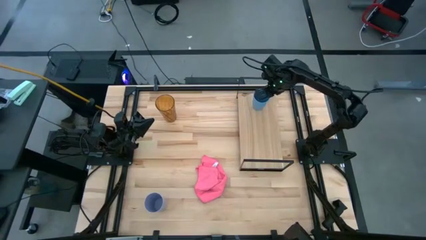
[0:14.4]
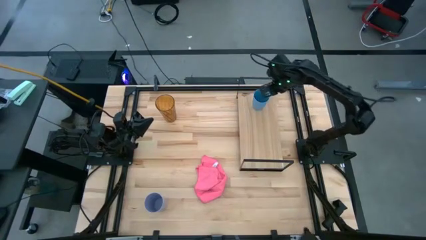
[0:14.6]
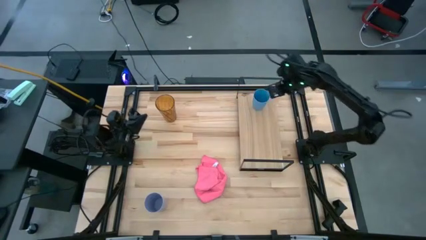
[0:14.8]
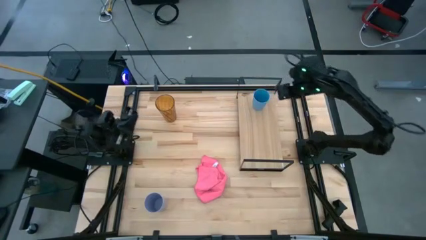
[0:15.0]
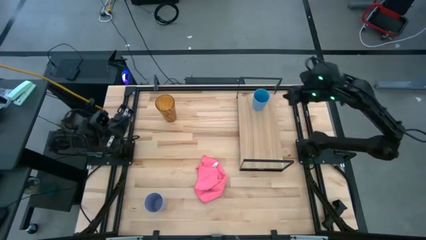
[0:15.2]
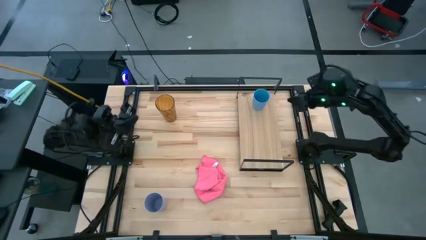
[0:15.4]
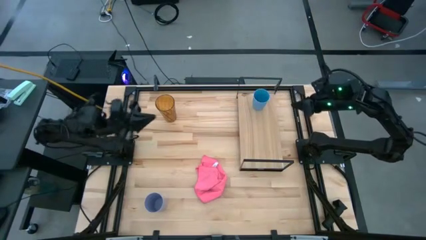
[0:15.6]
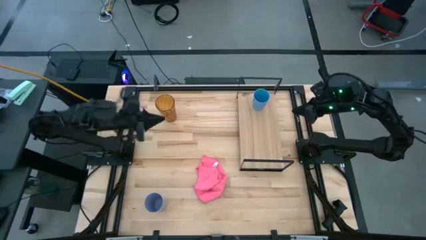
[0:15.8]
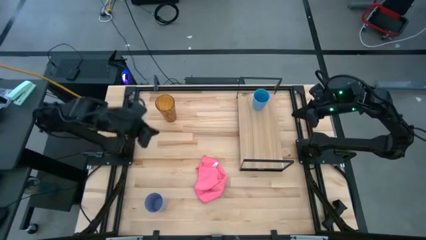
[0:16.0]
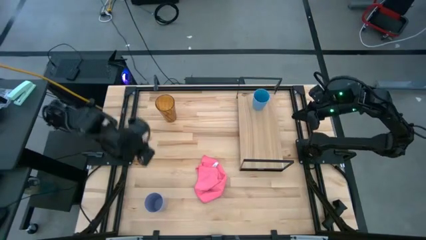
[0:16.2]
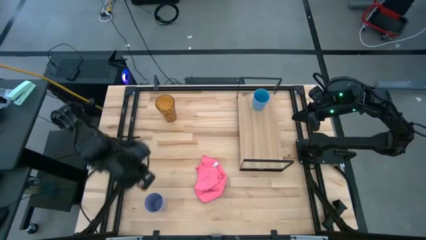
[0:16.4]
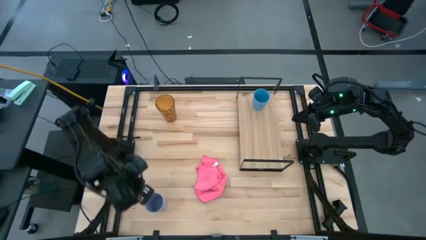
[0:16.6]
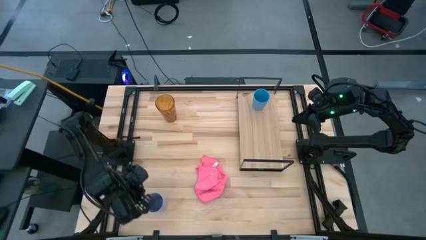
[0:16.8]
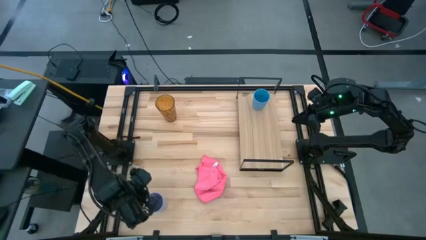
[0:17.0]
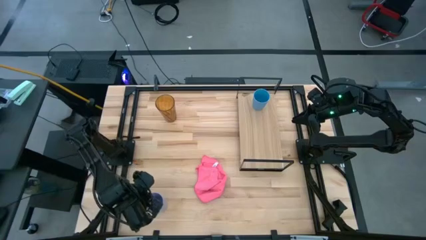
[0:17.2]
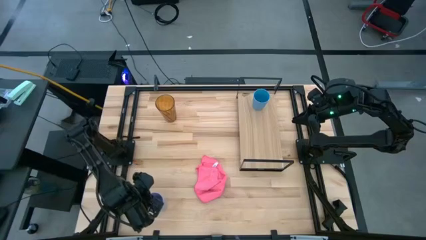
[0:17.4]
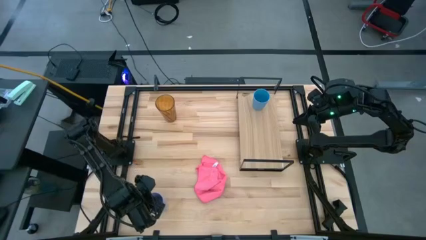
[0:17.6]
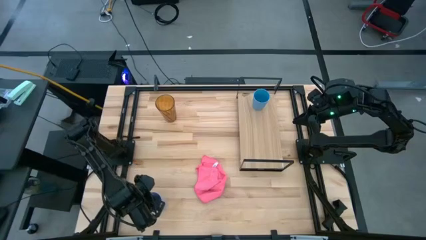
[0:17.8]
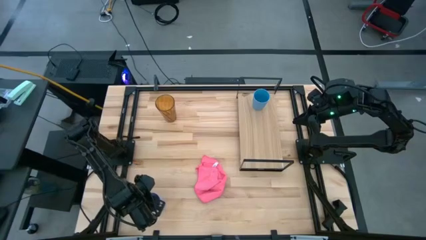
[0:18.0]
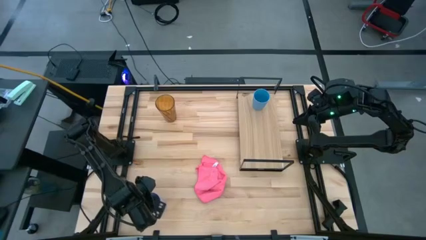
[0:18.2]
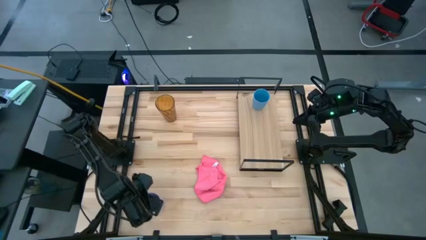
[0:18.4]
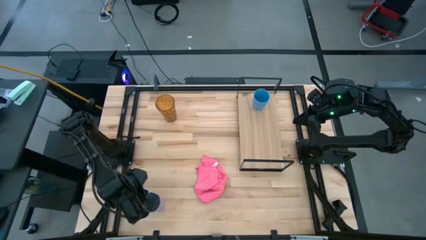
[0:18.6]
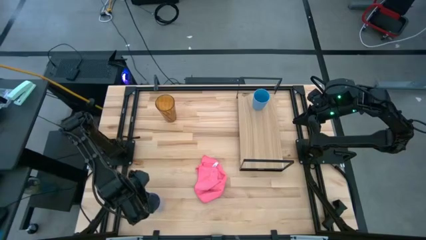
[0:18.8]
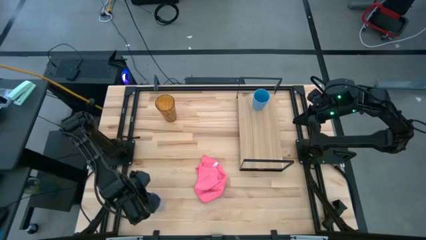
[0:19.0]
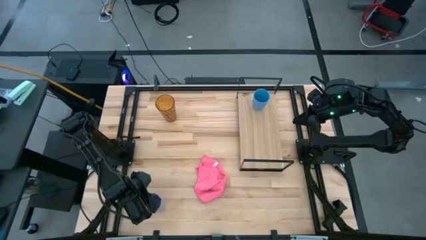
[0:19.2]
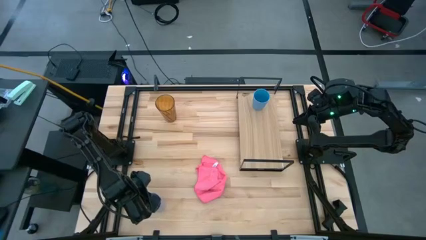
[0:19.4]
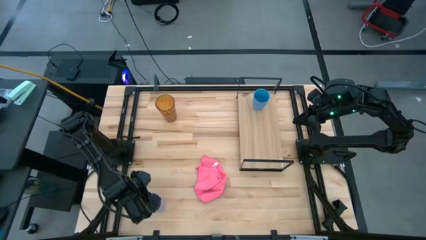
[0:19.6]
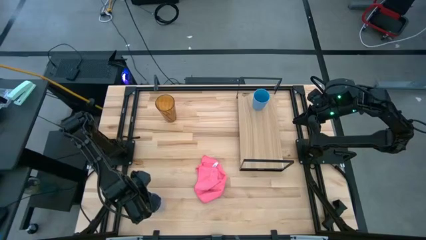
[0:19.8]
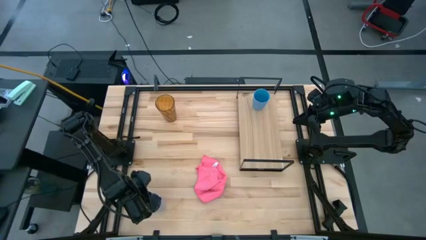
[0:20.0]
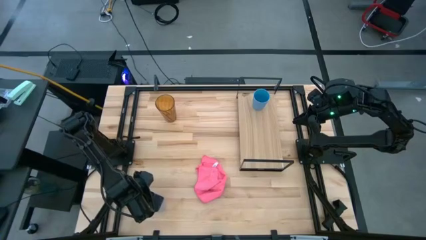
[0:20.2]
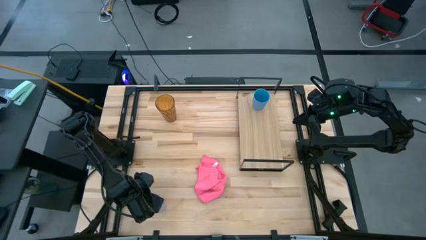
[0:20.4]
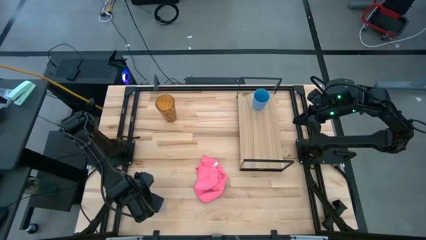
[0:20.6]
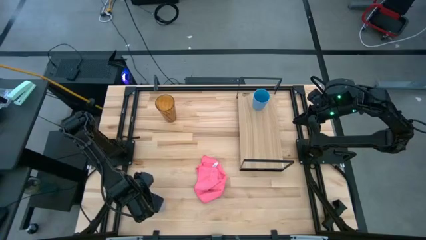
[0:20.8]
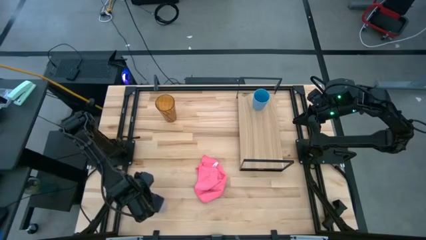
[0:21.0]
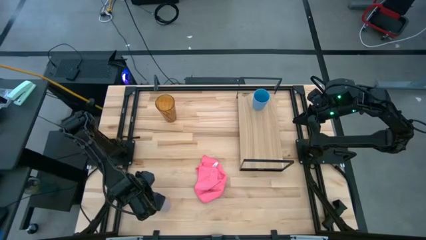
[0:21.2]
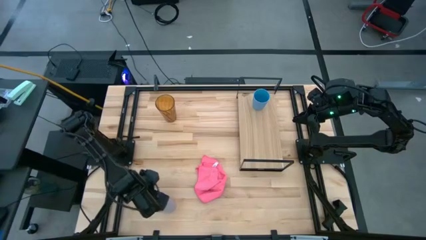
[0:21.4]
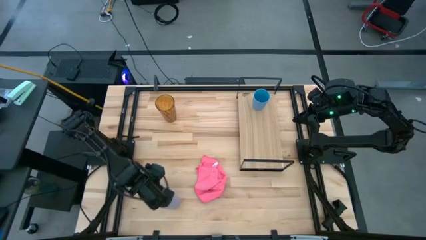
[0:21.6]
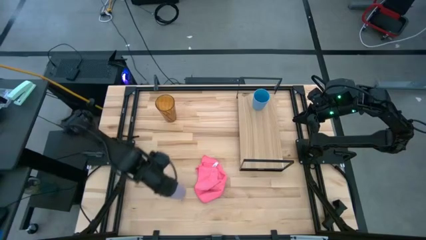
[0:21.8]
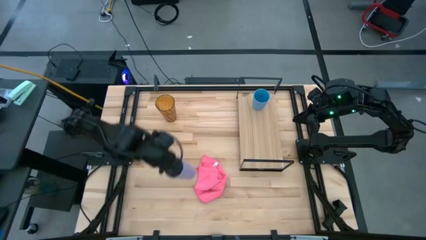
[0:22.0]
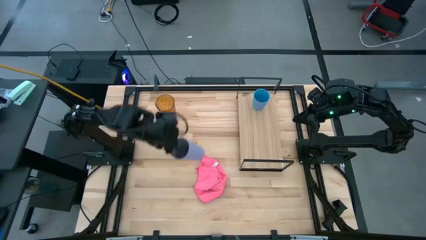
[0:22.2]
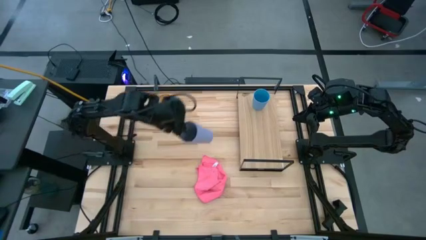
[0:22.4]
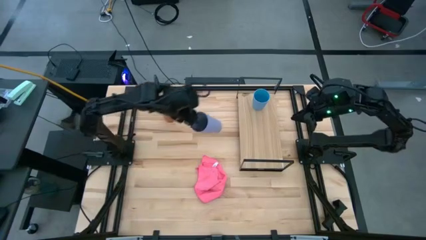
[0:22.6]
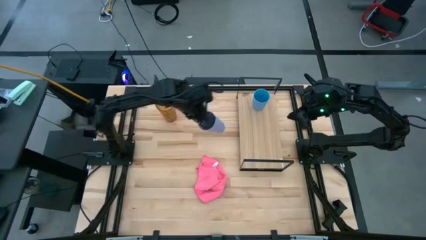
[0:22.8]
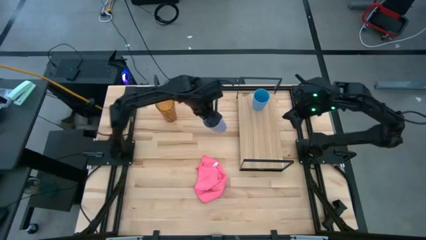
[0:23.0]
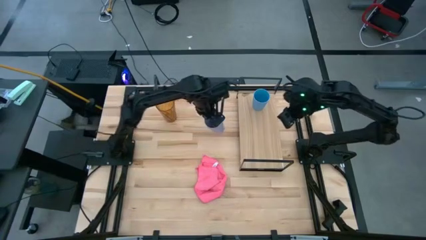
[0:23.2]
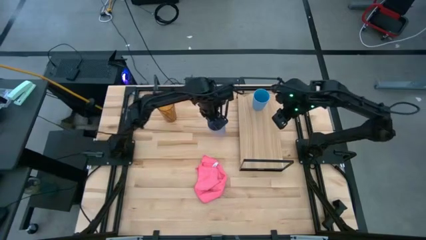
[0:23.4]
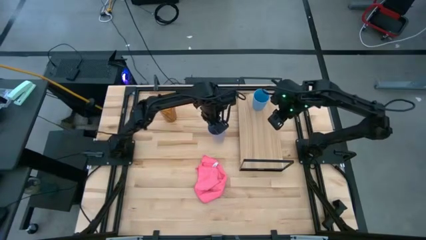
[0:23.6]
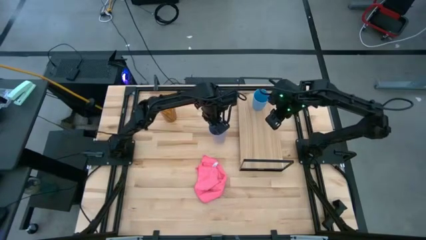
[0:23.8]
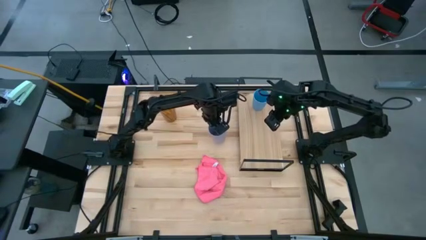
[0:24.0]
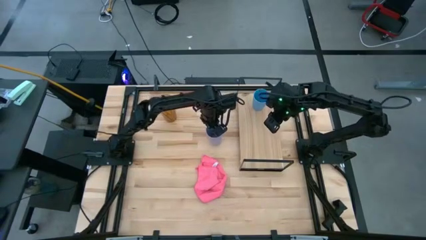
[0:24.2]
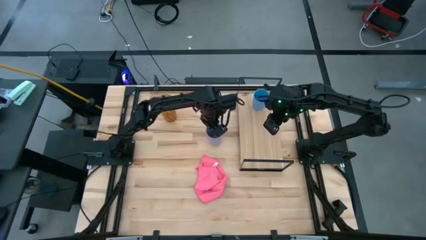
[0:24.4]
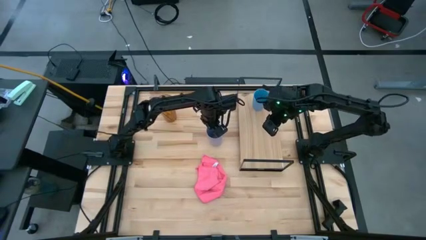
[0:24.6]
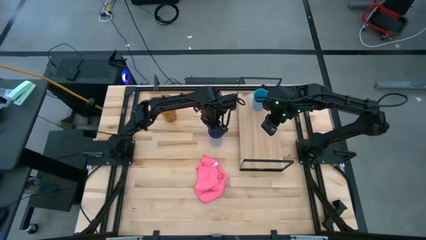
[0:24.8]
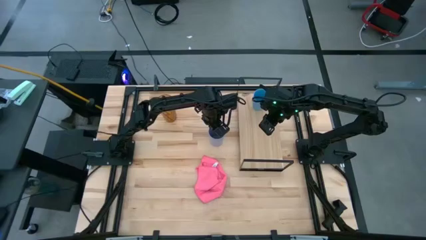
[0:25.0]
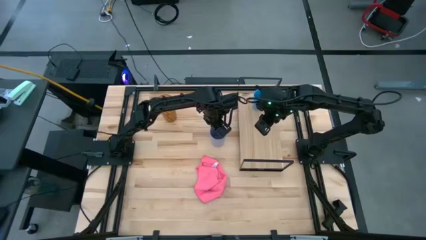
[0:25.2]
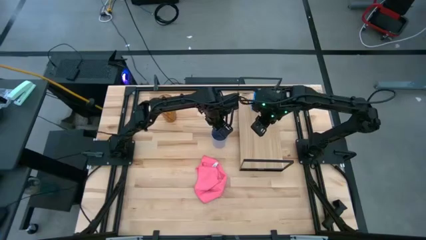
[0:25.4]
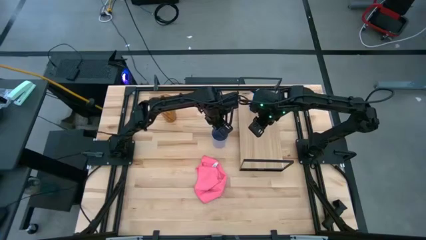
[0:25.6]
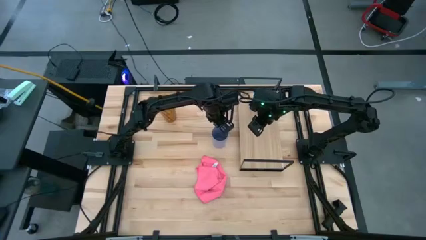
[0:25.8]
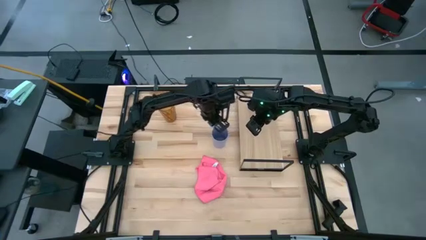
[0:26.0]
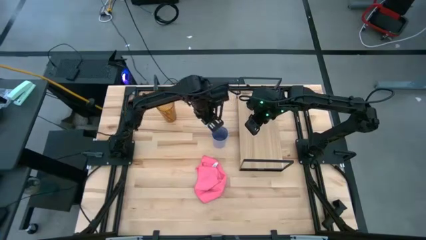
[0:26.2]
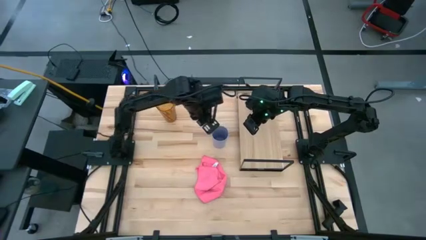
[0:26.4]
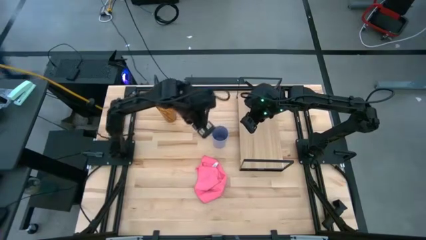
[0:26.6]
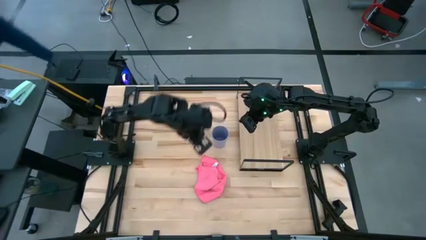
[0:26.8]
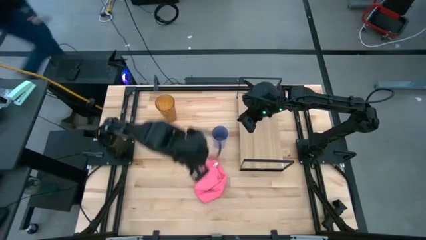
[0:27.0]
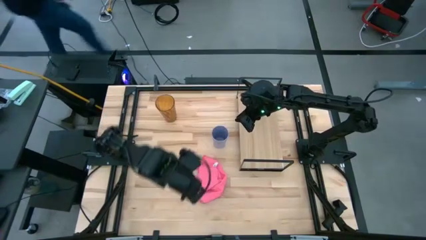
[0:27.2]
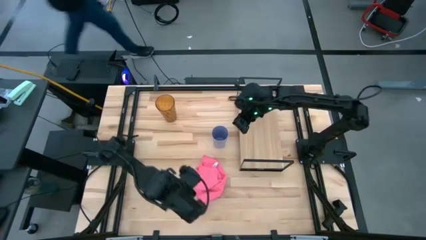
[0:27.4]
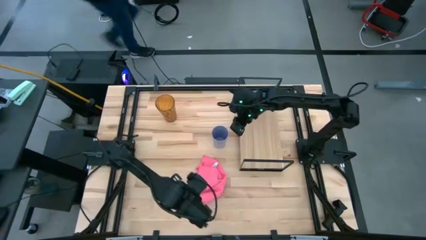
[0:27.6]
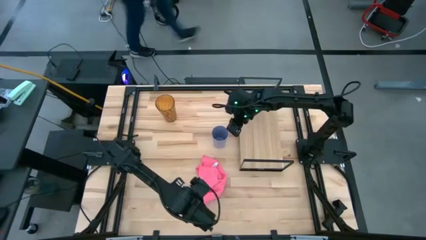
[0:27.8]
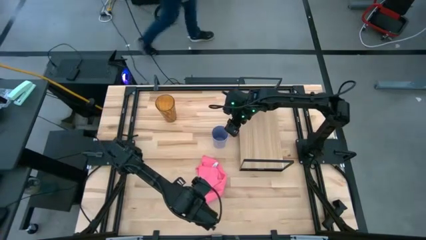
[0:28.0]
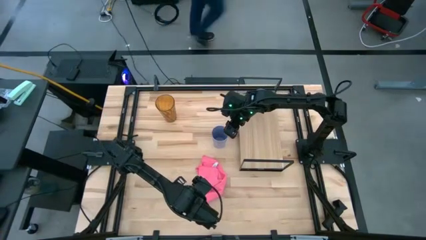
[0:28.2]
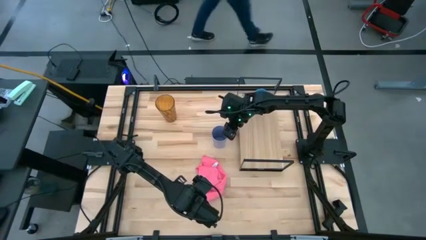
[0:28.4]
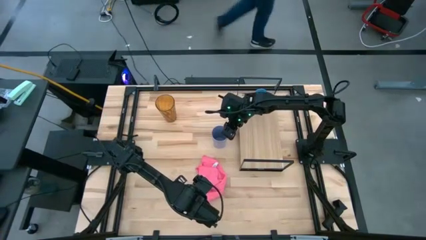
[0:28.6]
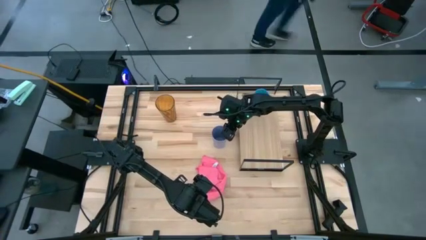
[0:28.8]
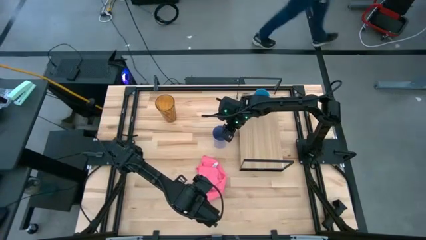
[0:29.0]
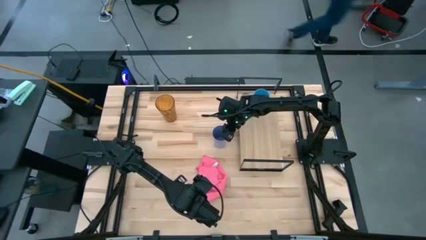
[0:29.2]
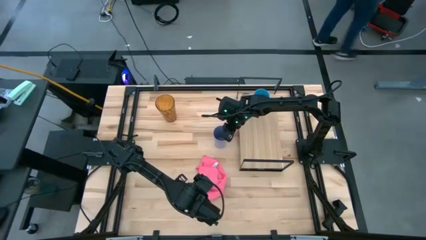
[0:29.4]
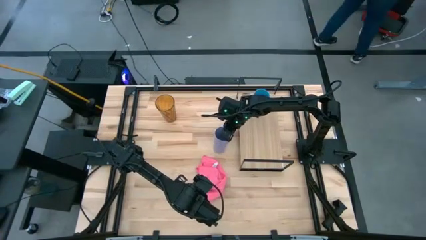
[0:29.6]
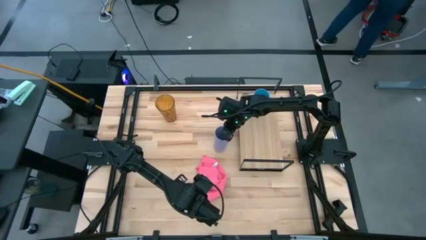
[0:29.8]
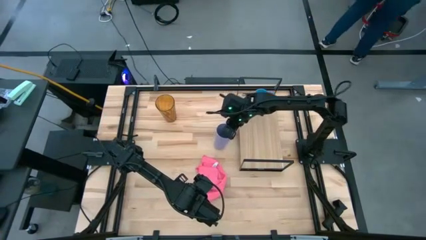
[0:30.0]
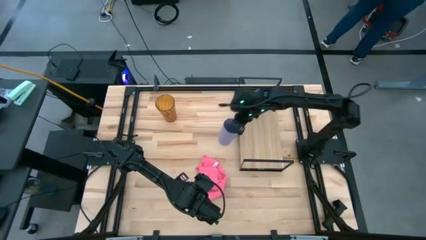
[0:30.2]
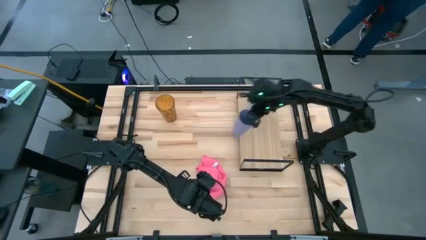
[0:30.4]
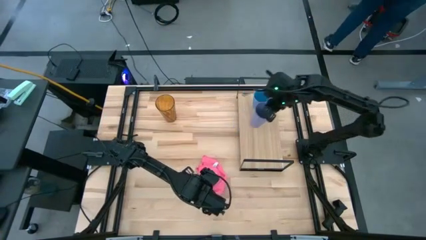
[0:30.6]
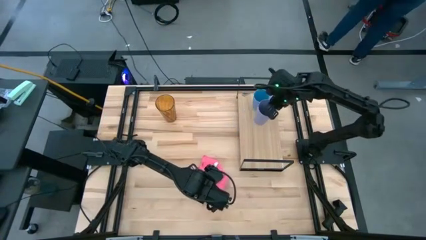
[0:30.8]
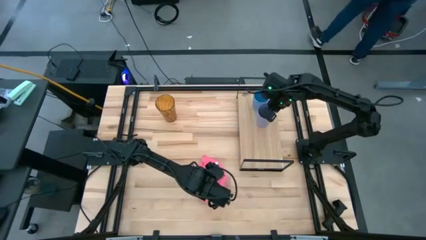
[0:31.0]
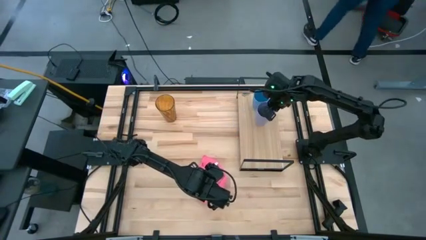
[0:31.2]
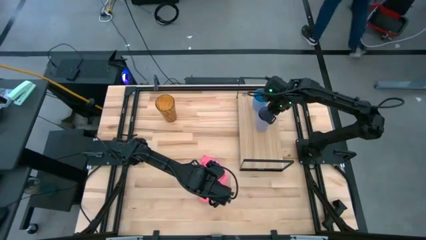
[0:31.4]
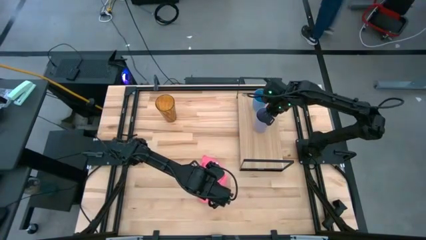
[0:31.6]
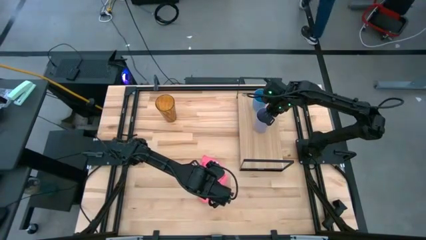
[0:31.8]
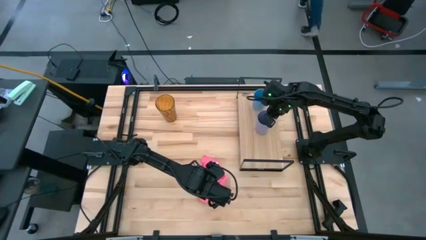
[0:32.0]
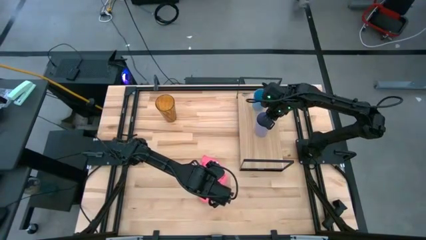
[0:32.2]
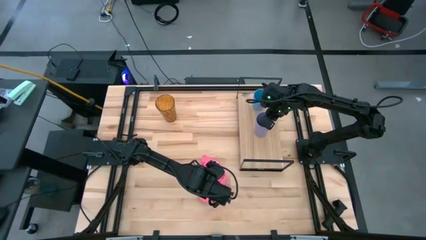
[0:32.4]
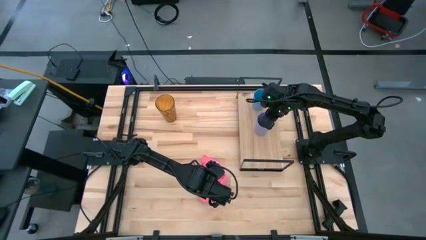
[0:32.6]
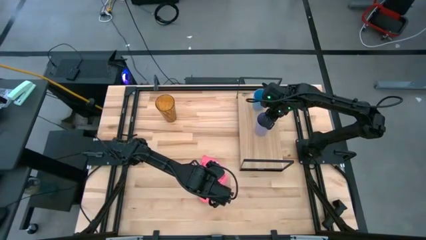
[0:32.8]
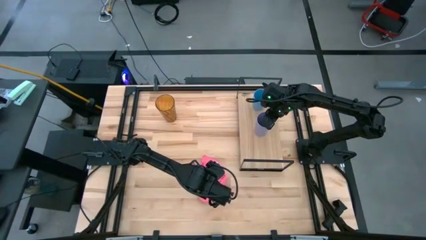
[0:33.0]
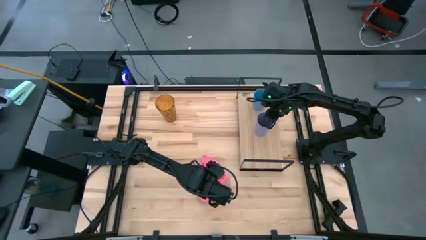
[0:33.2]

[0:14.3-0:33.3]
Task: Stack small to large cups/mugs on shelf
Put the purple cup on the shelf
